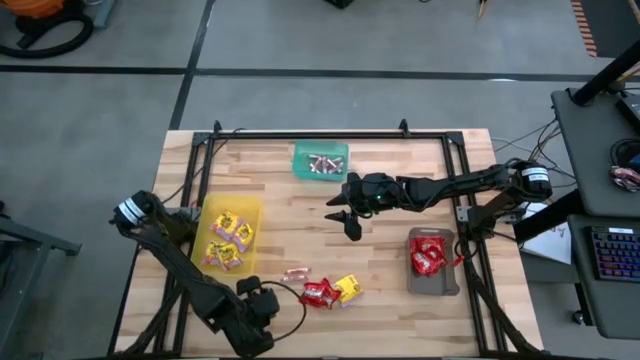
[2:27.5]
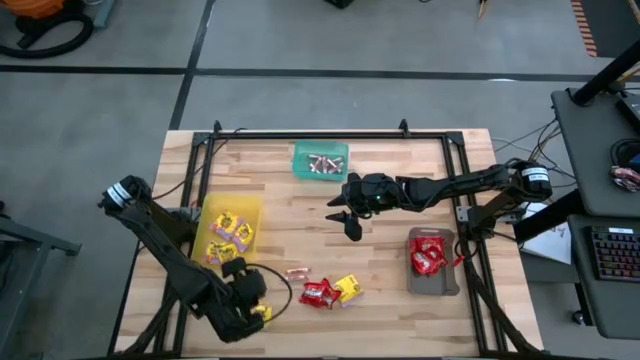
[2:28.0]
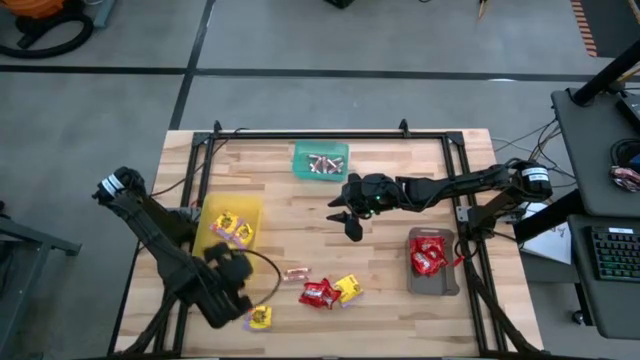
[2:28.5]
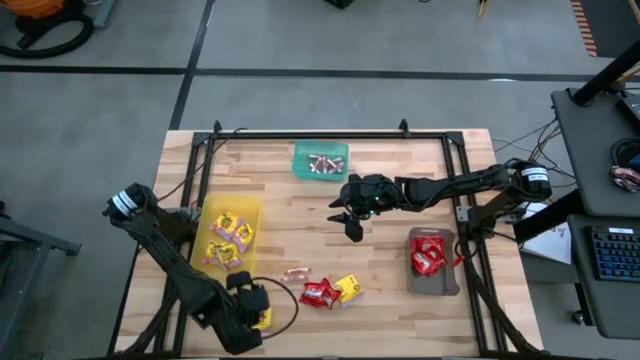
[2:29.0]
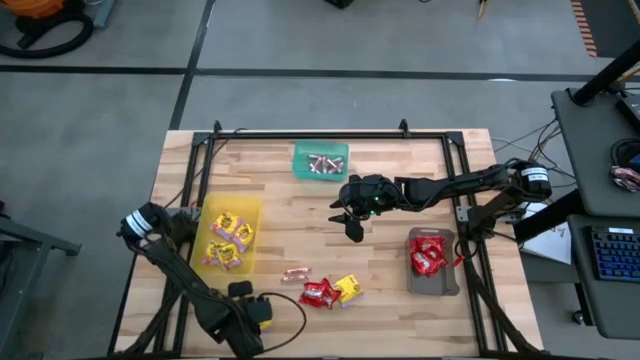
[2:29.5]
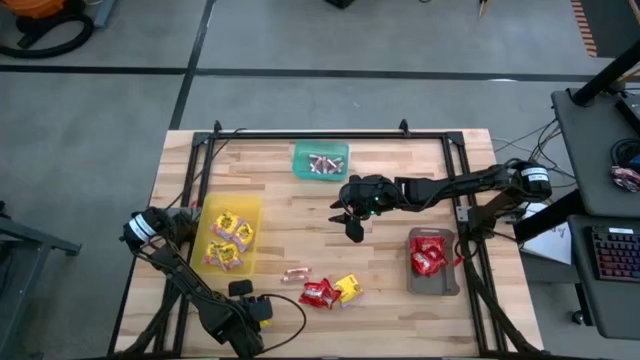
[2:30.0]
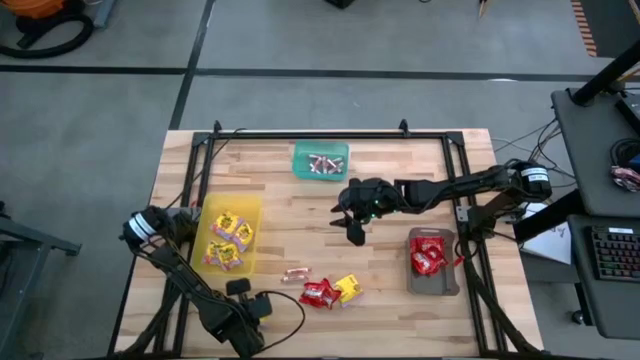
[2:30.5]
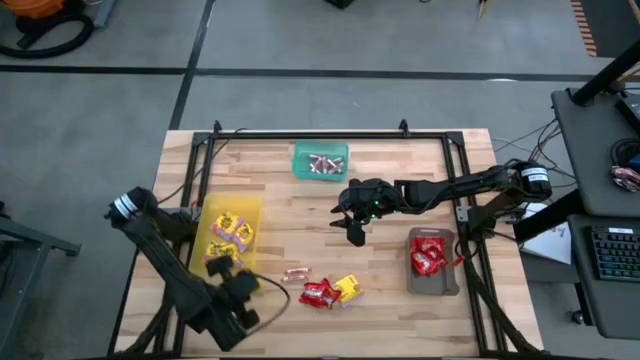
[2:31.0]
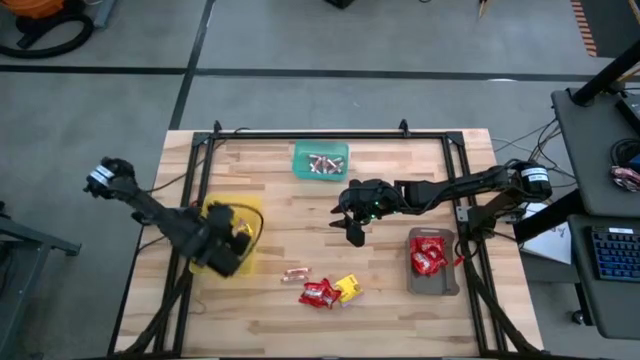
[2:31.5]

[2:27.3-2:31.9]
Task: Sort candy
Put the yellow candy into the yellow bin

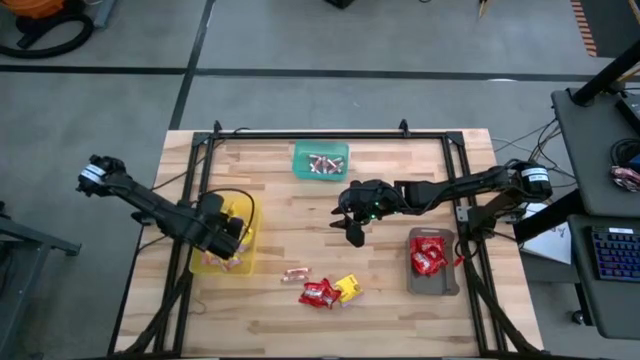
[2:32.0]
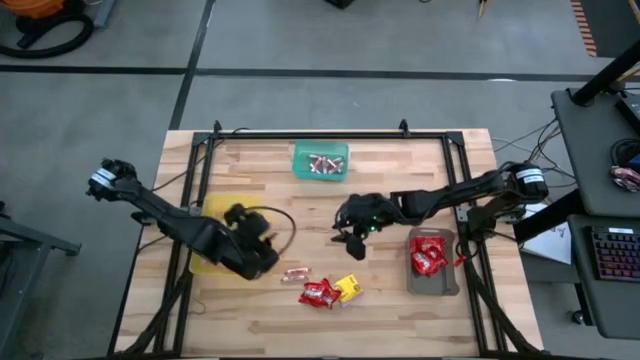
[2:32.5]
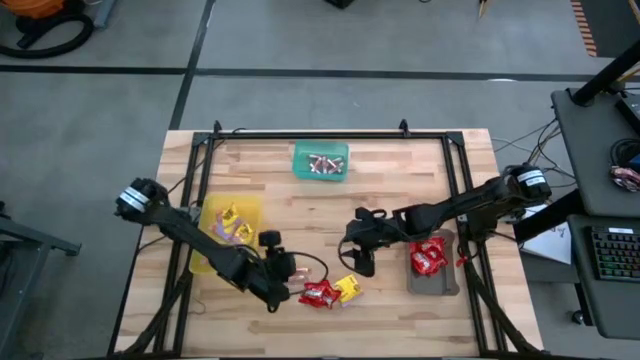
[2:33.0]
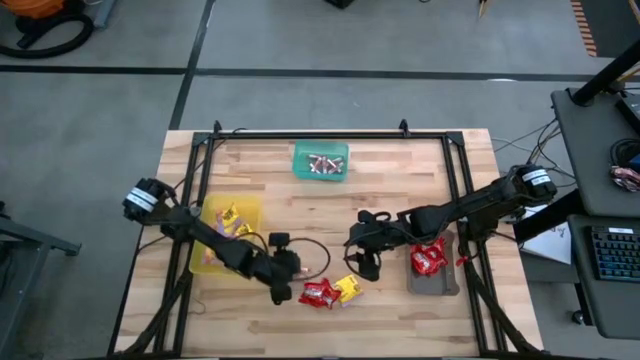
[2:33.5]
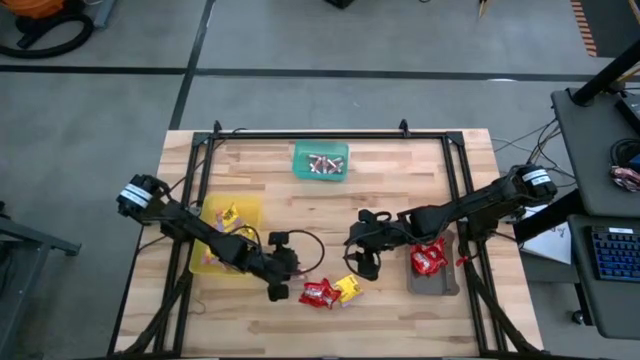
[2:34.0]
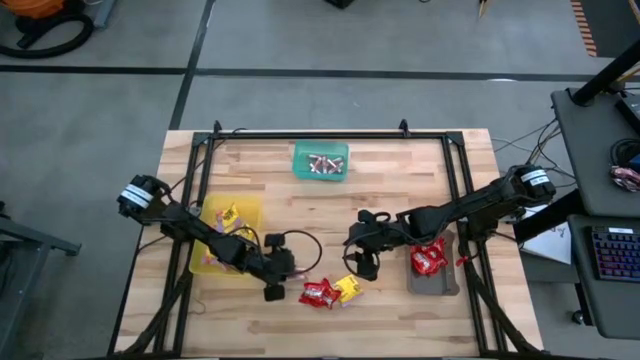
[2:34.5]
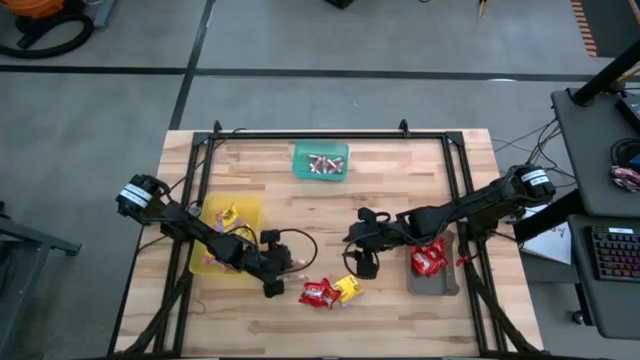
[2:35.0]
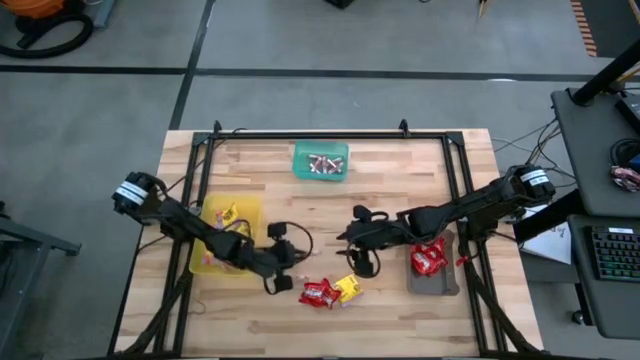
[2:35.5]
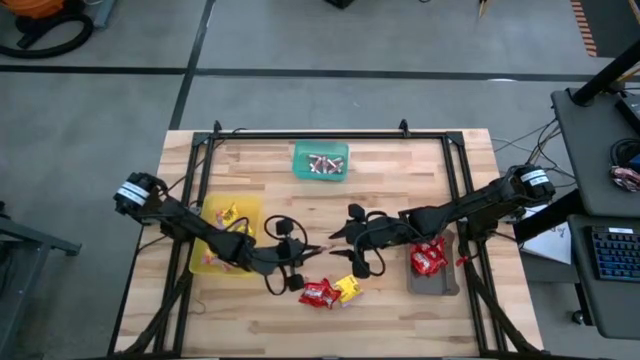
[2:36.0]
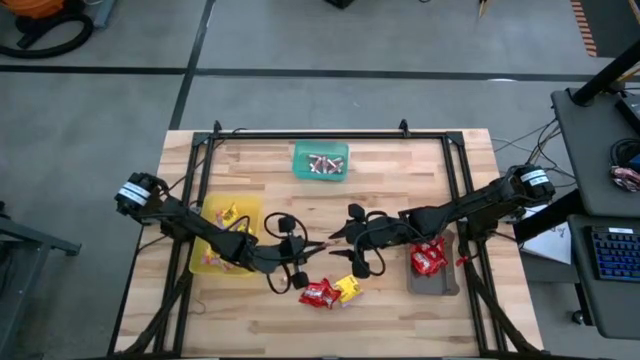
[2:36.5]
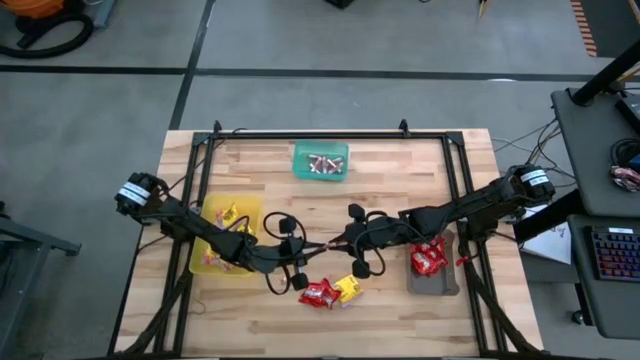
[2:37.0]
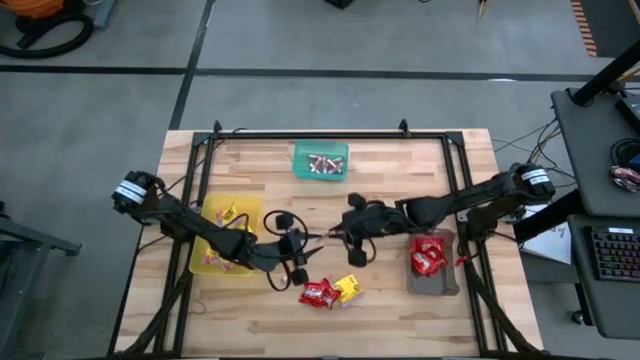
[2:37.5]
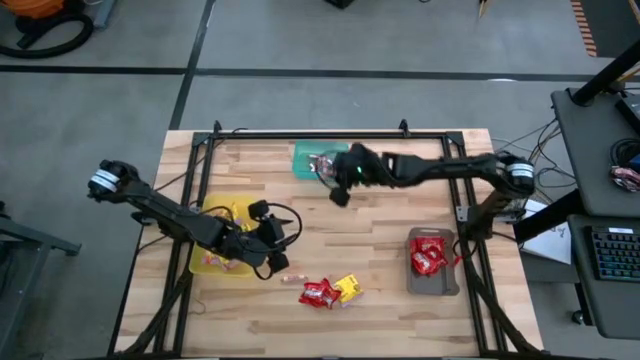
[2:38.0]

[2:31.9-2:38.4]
Put the white candy into the green bin

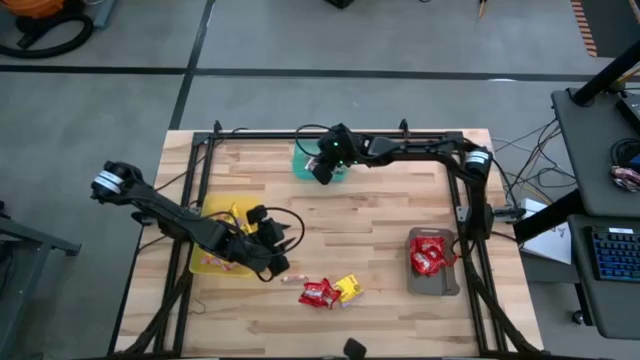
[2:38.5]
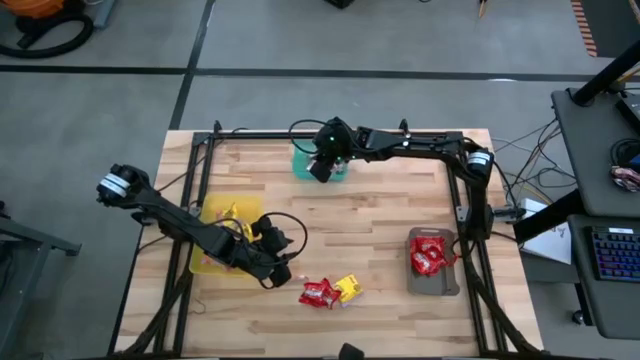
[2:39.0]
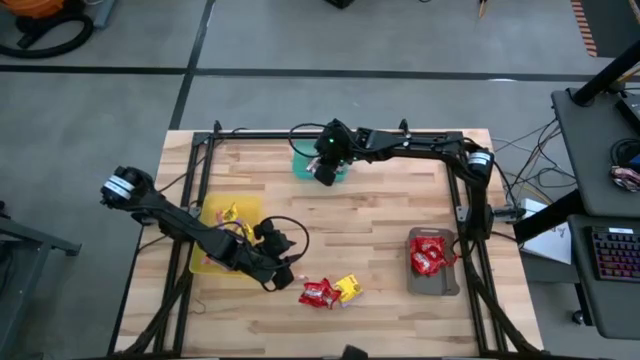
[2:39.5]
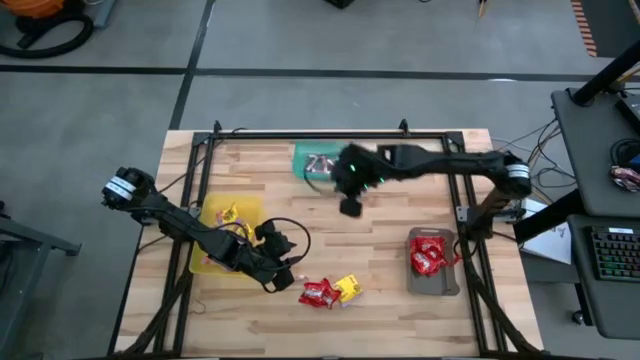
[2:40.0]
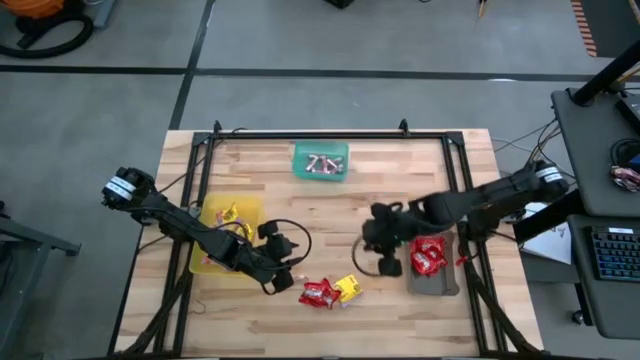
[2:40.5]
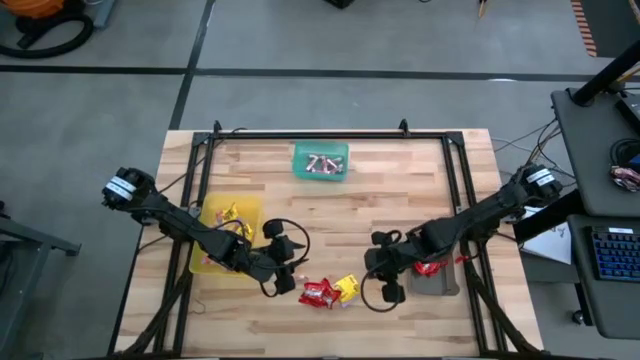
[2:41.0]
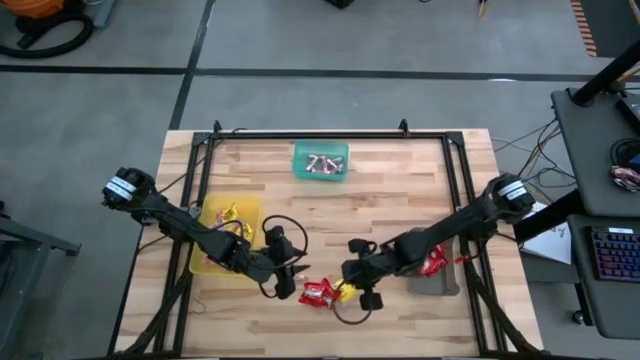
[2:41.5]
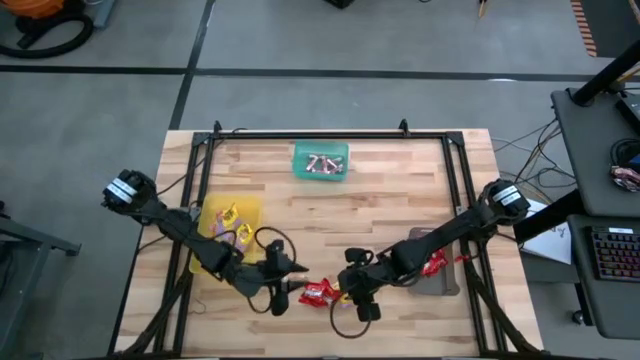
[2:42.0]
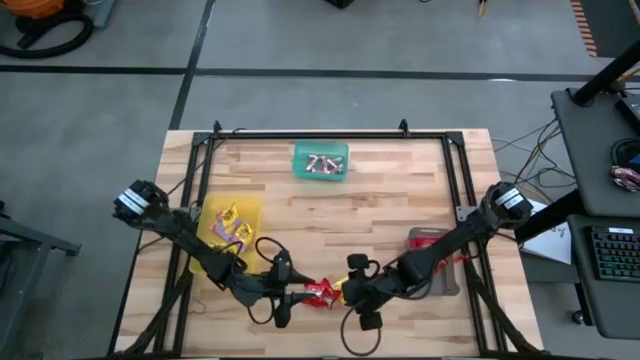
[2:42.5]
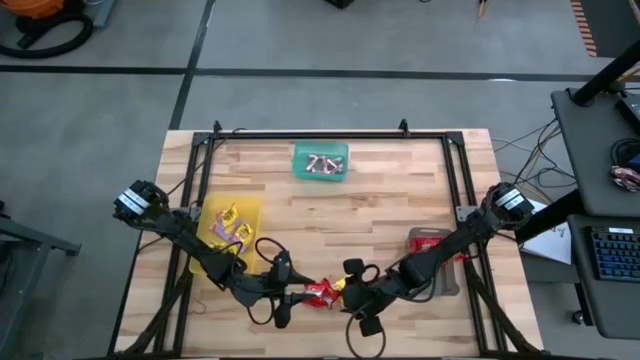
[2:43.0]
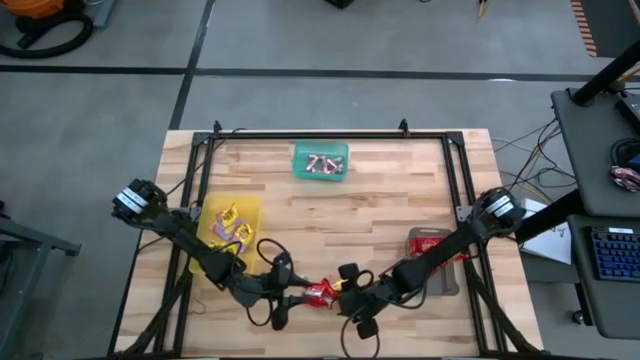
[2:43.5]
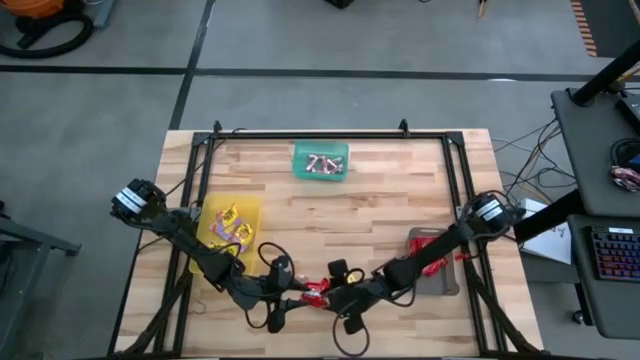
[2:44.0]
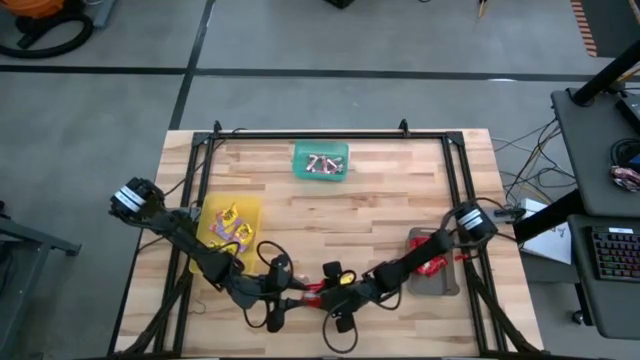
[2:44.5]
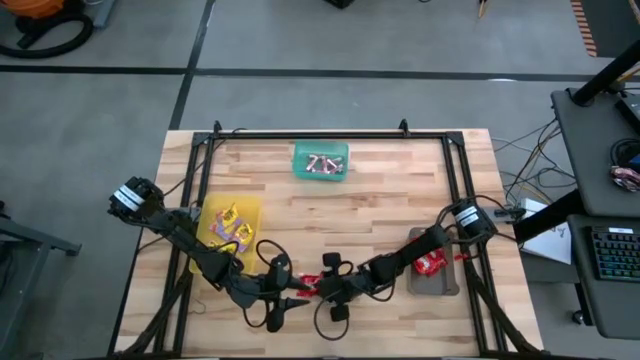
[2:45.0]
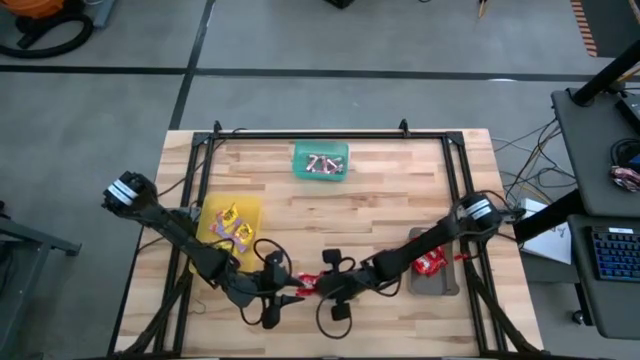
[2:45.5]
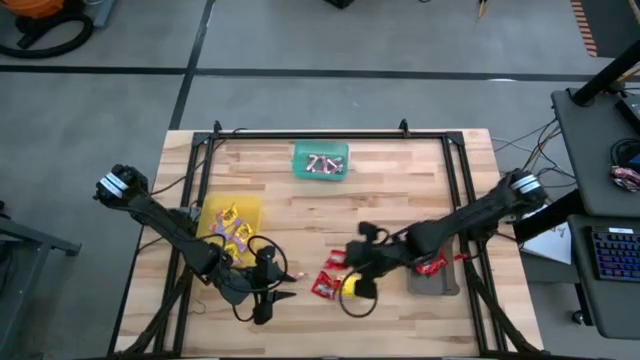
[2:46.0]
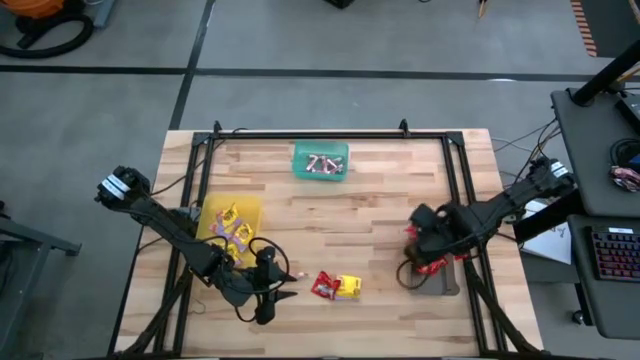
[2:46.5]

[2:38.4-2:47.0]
Put the red candy into the black bin

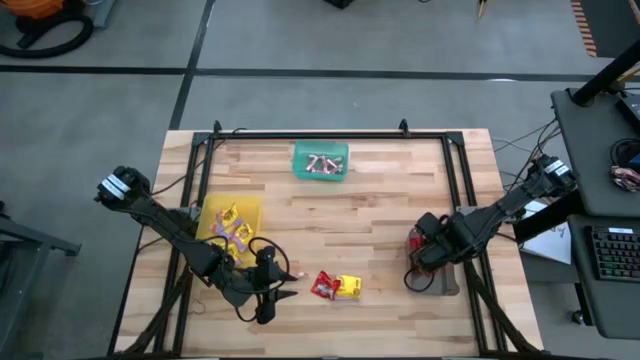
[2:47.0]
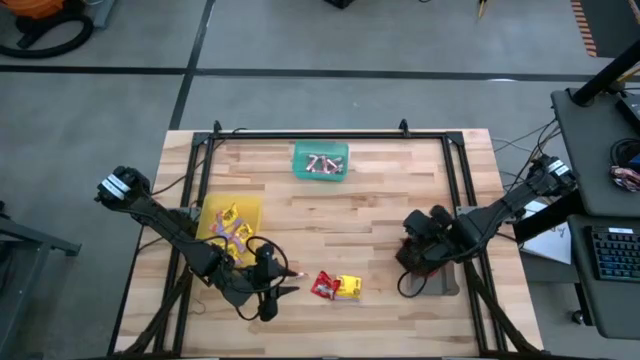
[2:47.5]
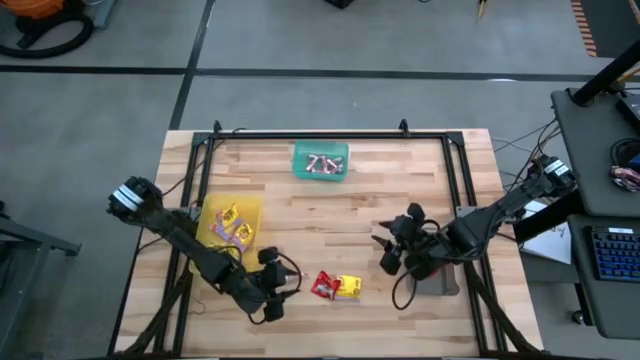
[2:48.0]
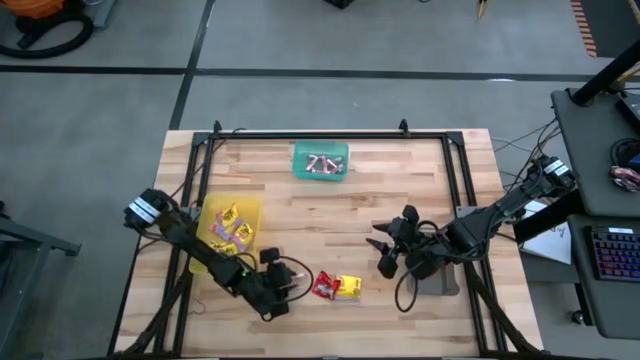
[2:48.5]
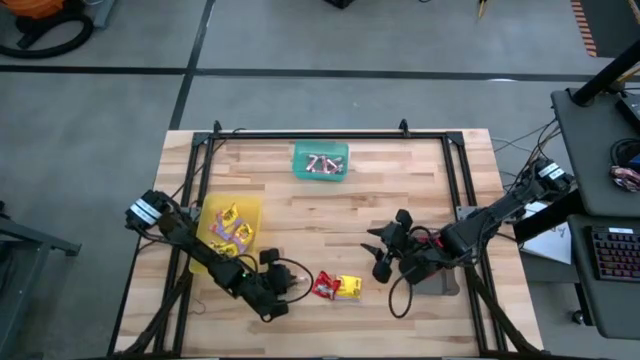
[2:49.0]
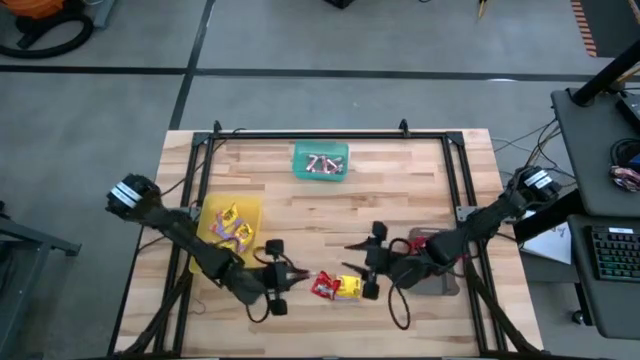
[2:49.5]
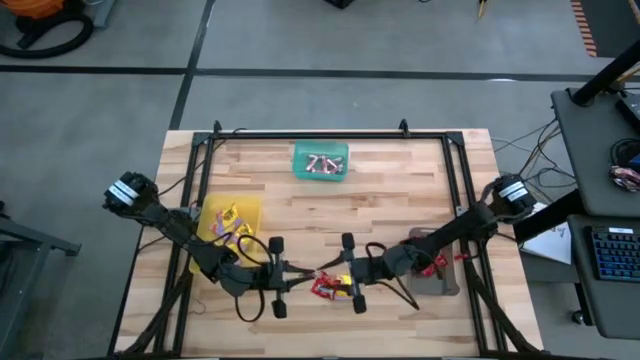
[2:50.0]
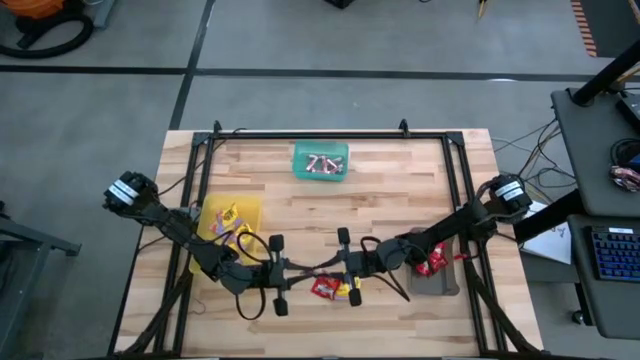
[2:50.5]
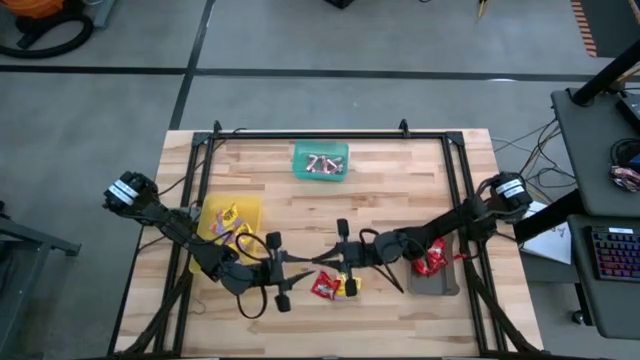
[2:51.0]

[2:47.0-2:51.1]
Put the white candy into the green bin
